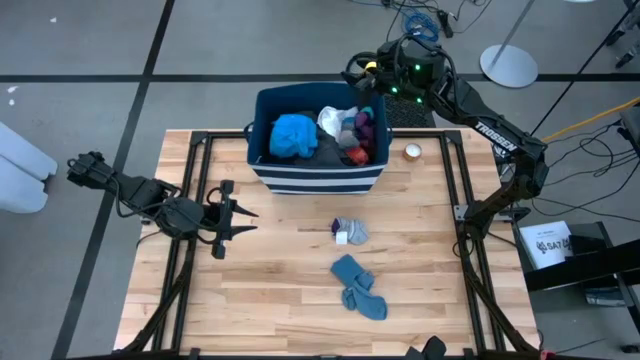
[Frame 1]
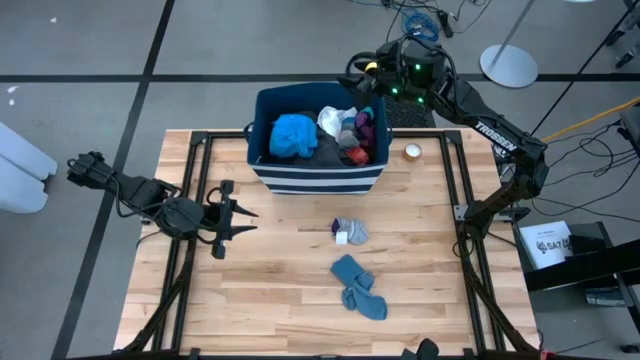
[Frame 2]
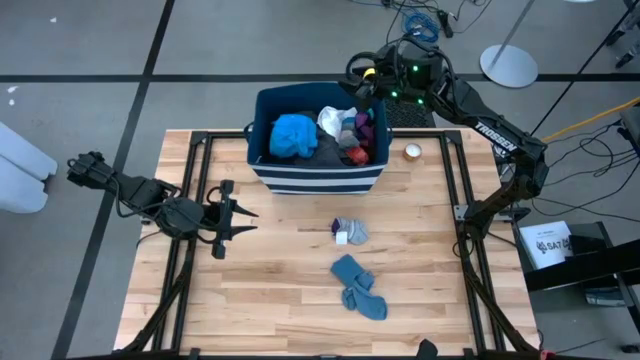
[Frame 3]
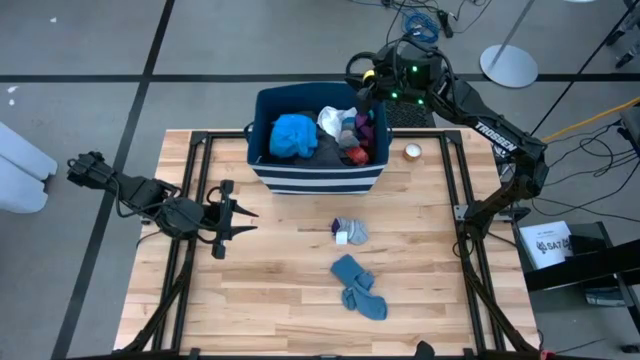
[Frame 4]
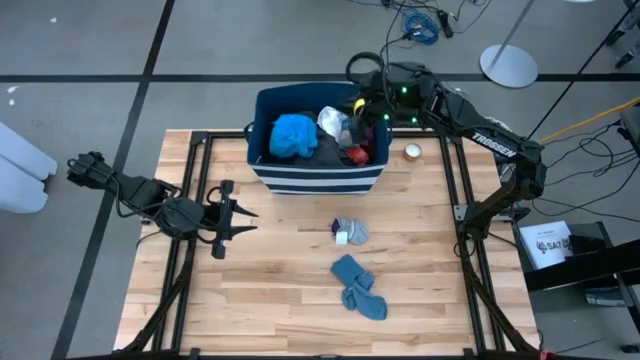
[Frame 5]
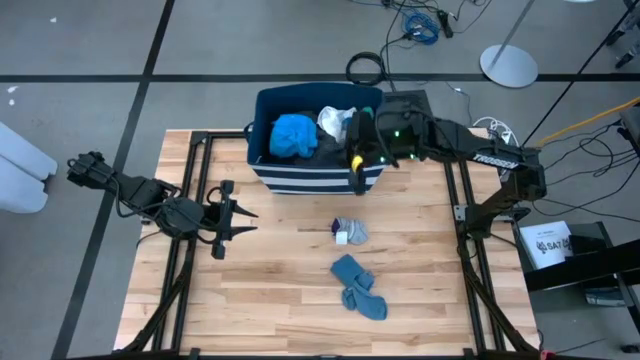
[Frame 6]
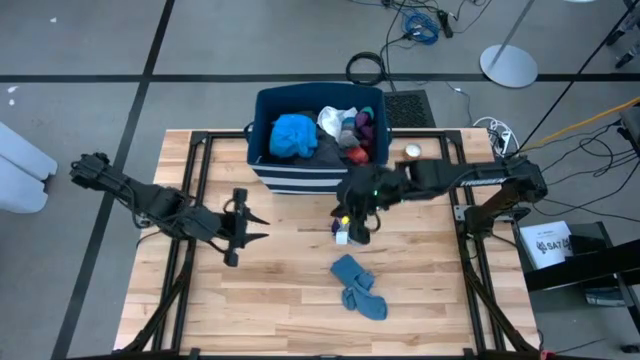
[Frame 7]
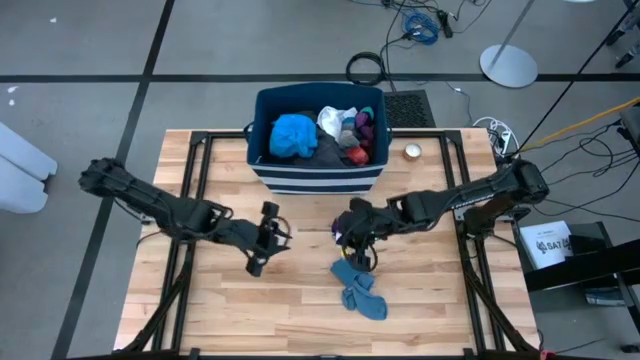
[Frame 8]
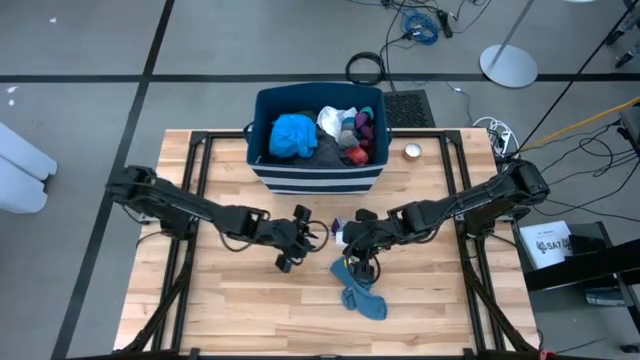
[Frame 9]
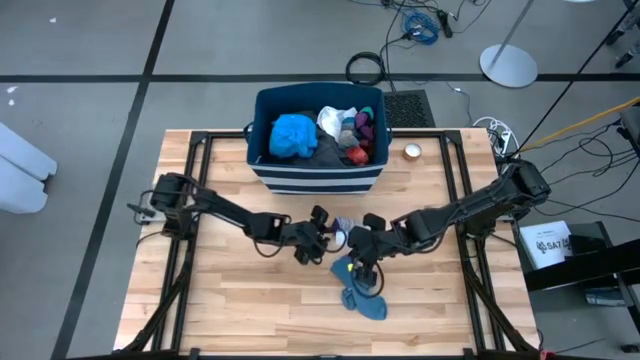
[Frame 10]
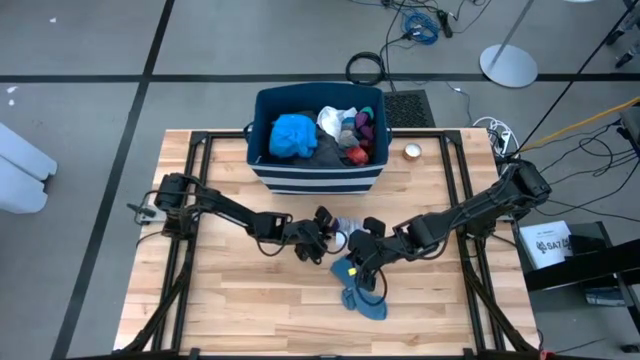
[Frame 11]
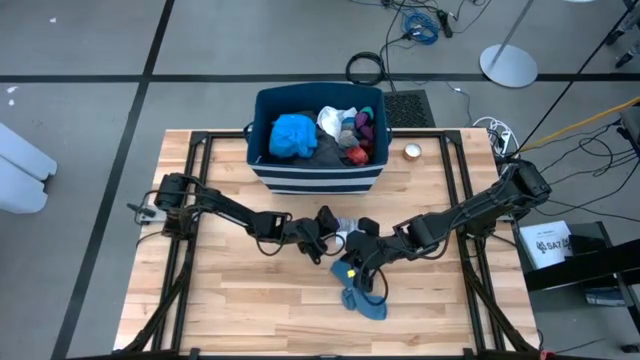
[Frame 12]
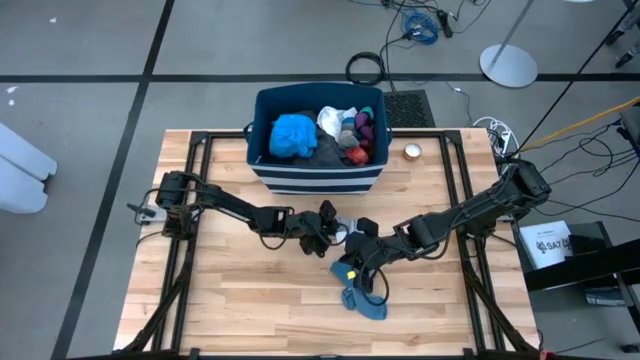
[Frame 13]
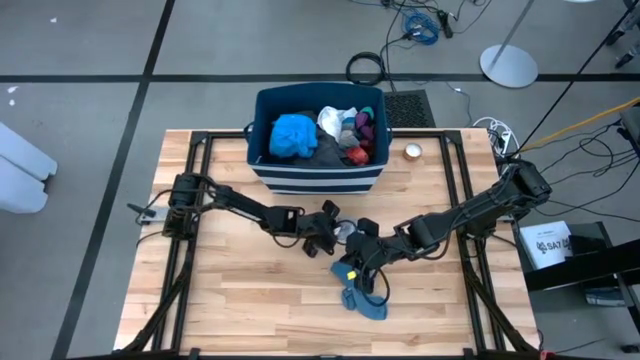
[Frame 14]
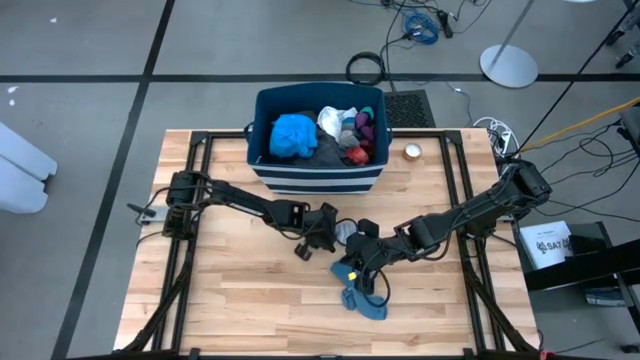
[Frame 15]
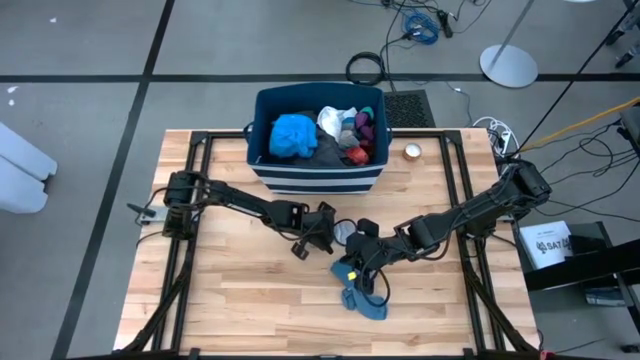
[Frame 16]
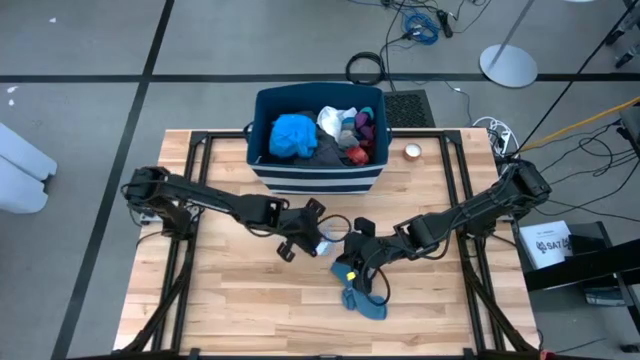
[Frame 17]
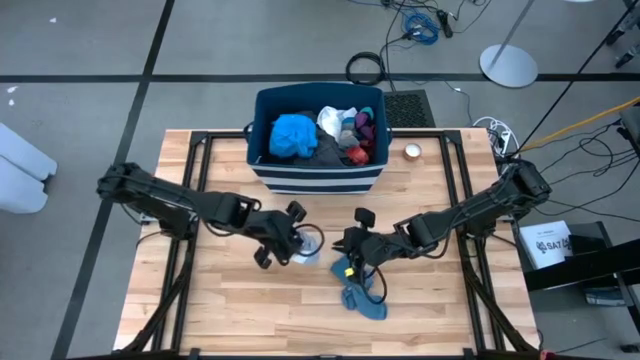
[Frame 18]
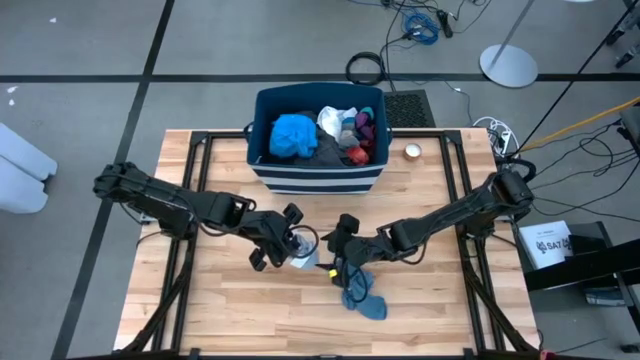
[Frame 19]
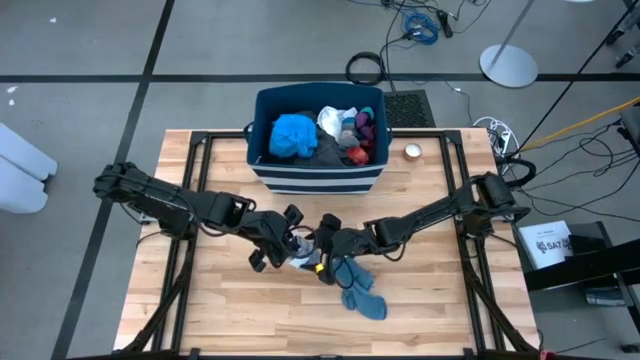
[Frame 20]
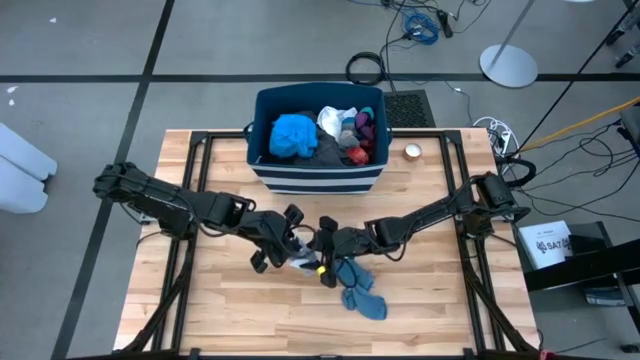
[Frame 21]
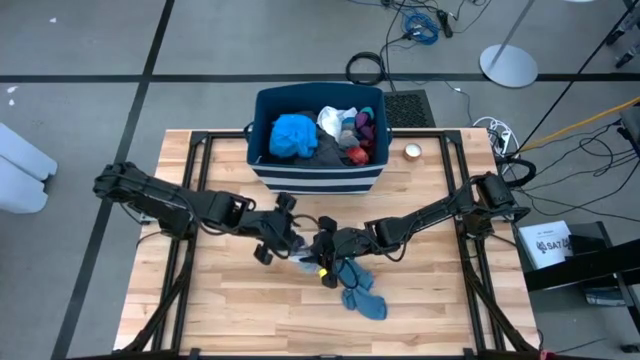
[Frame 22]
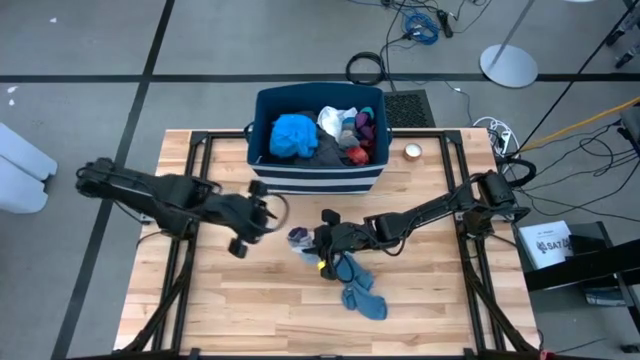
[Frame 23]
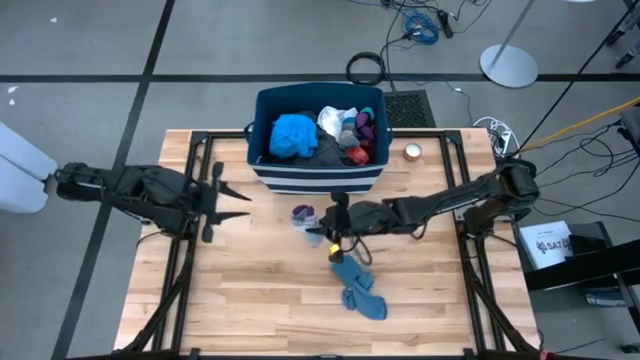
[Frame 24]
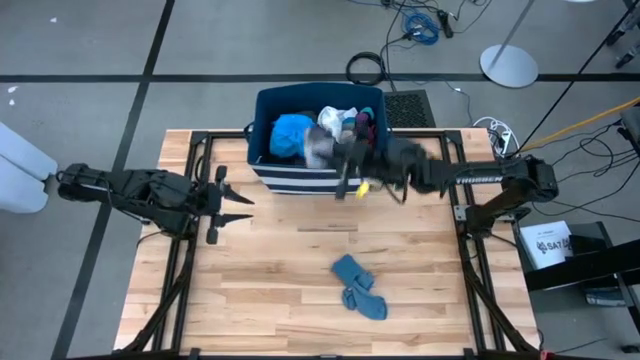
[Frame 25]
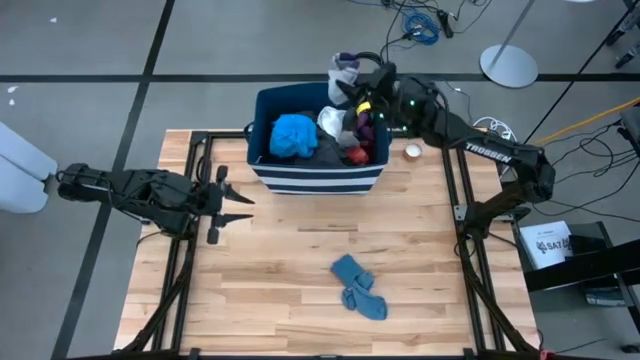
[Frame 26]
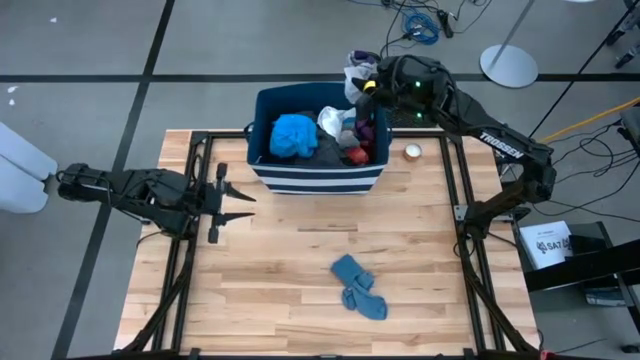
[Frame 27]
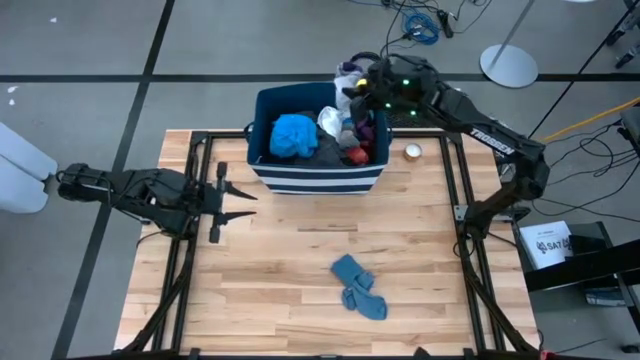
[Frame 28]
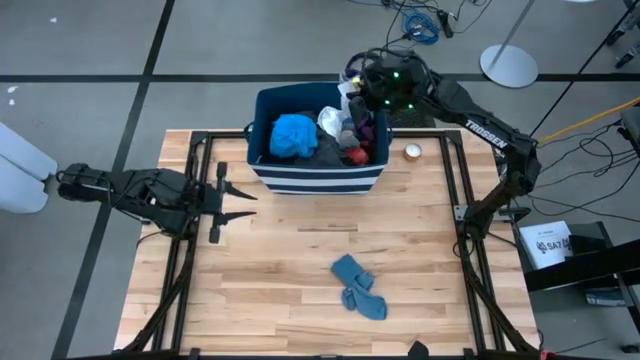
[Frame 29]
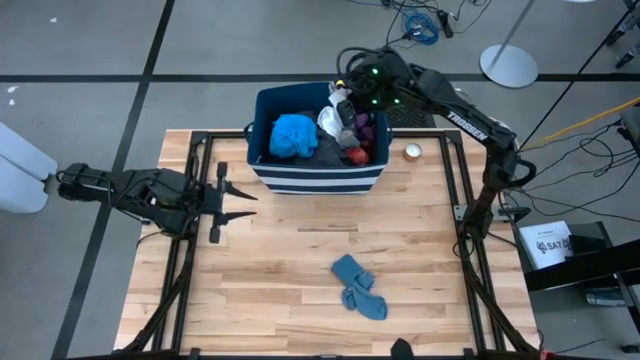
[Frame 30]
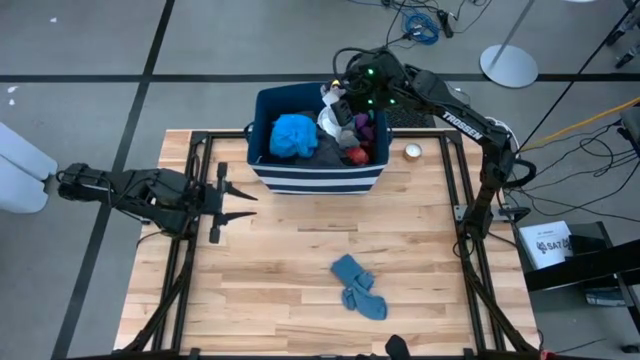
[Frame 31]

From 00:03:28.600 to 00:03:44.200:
Task: Sort clothes
Put the gray and purple sock into the blue laundry bin

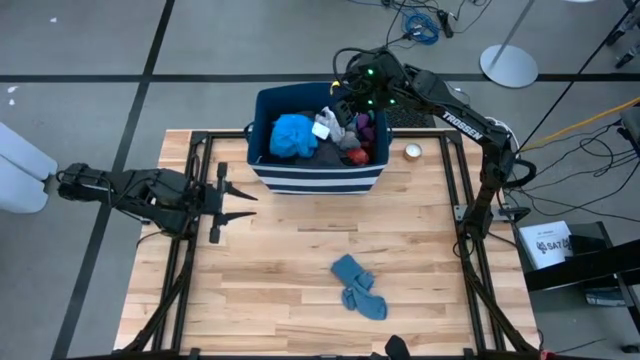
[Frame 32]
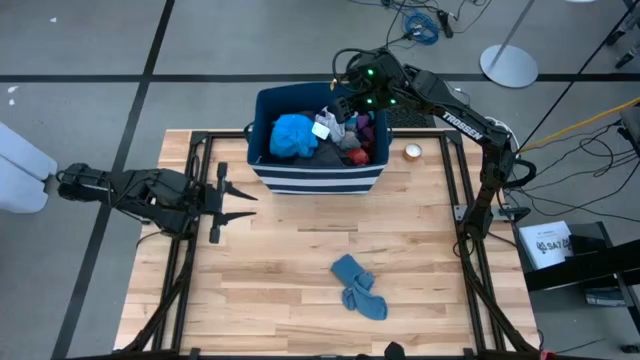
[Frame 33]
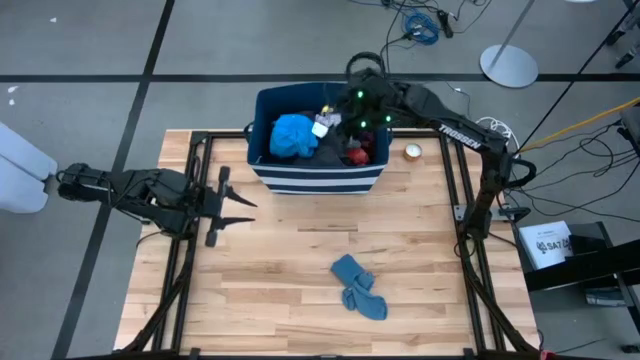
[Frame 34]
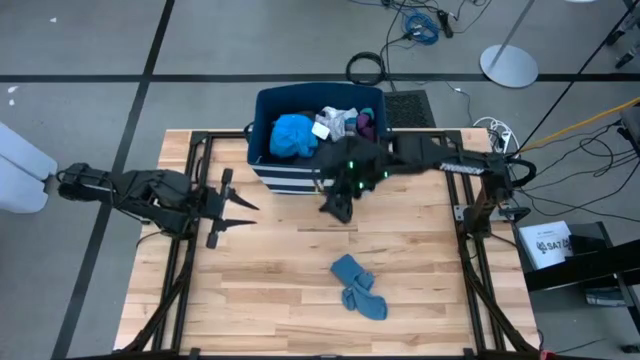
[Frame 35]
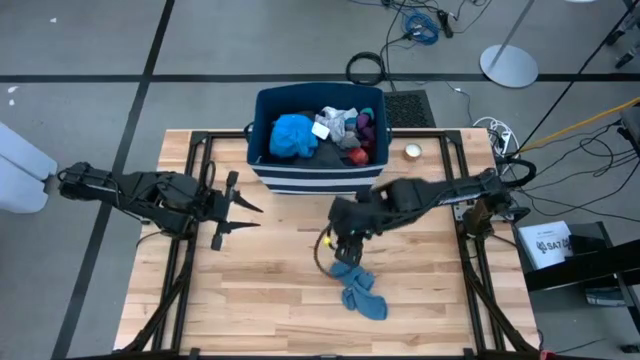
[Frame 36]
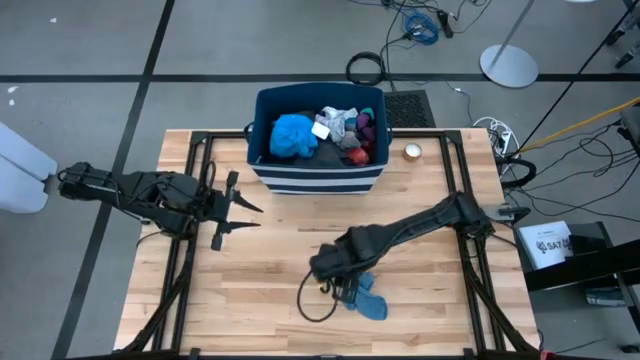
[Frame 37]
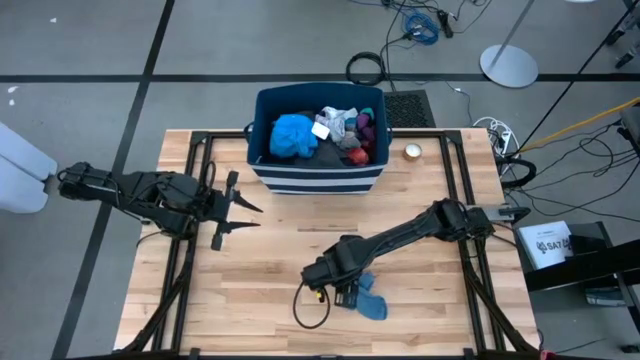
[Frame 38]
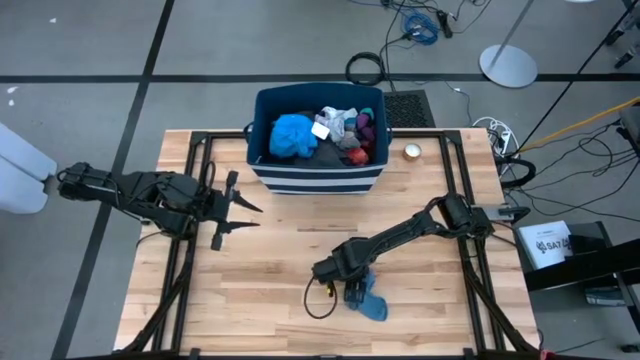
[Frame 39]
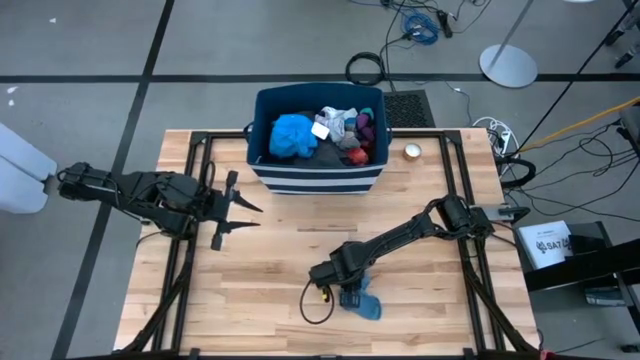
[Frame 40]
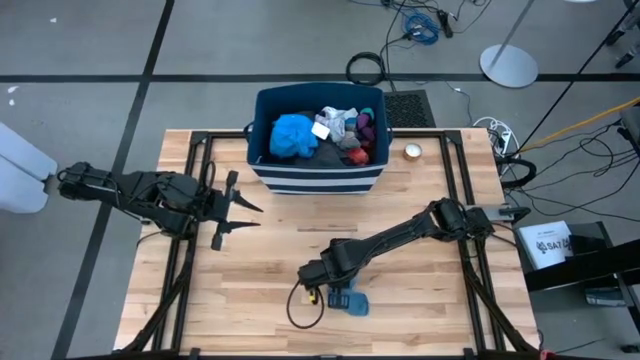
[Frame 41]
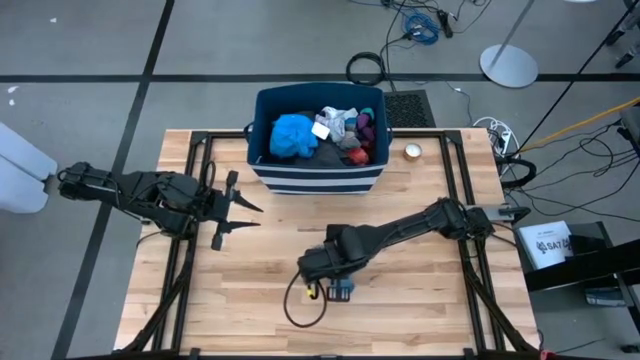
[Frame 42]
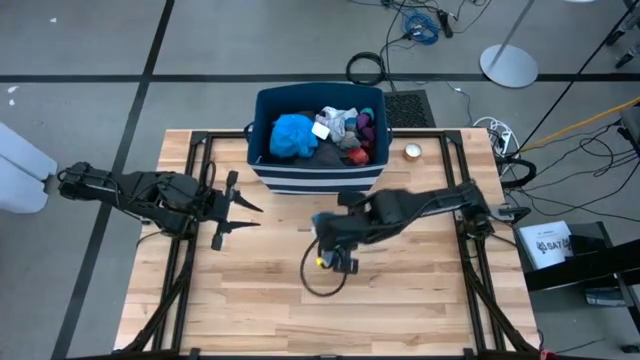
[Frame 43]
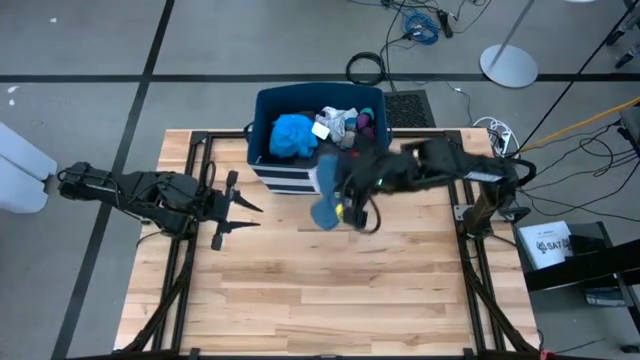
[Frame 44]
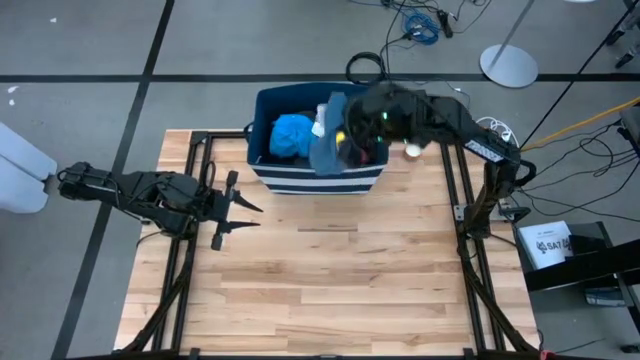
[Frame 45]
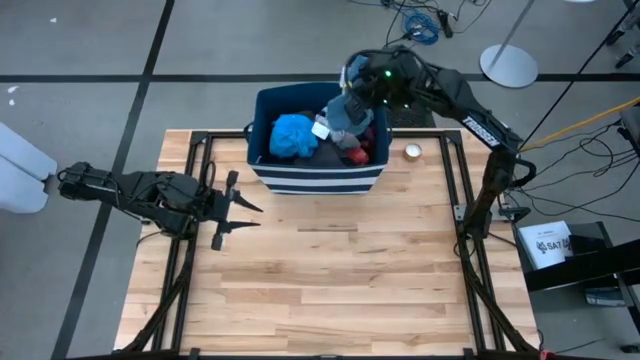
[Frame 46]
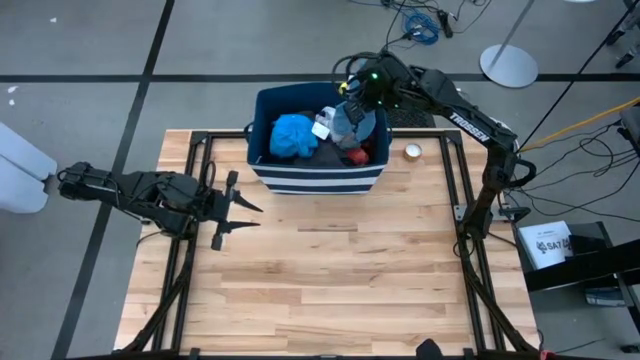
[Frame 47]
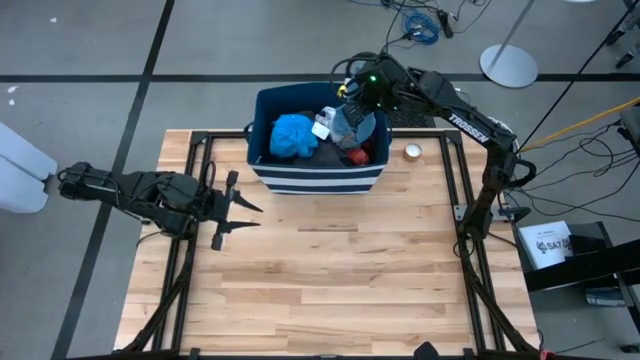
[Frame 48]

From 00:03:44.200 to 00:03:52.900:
Put the blue sock into the blue laundry bin
